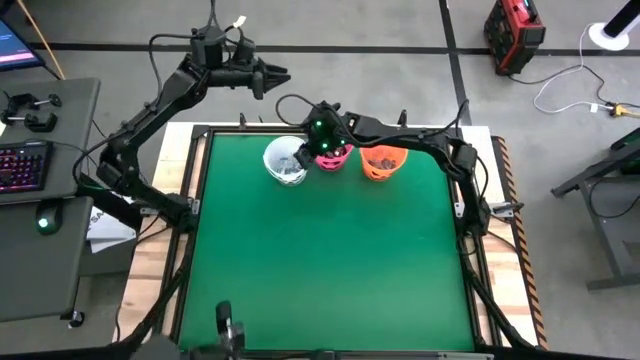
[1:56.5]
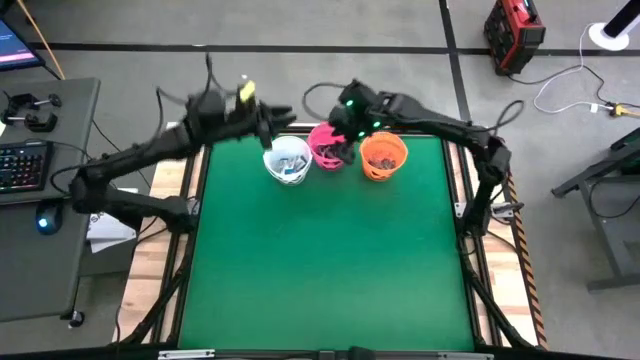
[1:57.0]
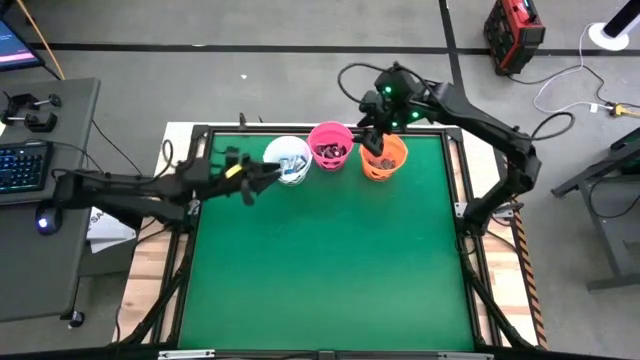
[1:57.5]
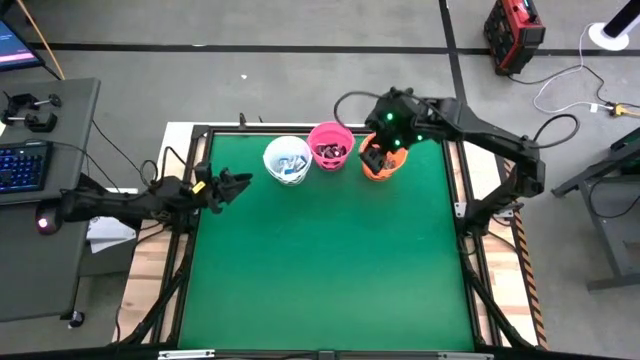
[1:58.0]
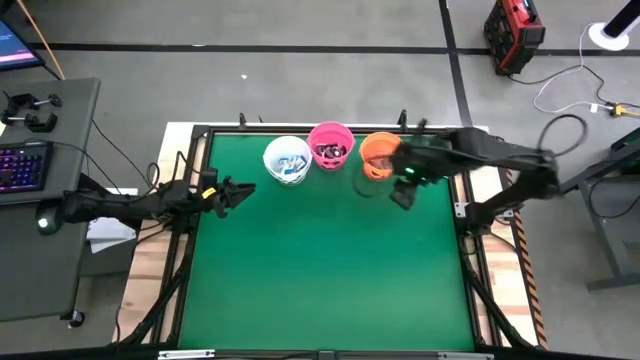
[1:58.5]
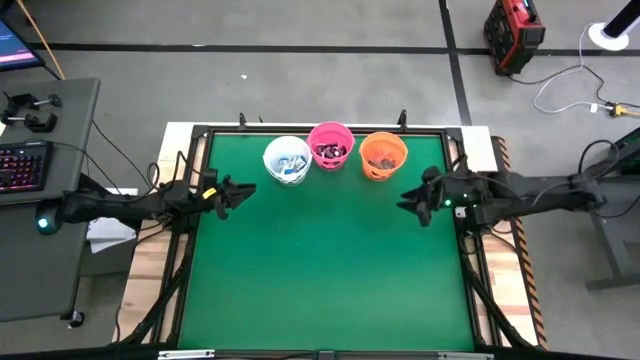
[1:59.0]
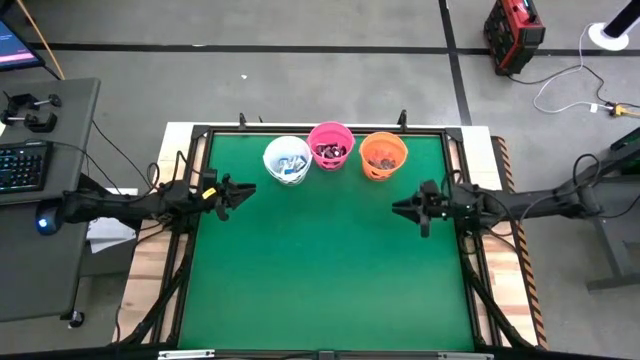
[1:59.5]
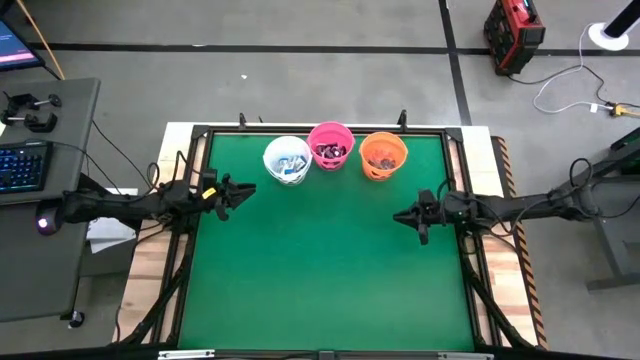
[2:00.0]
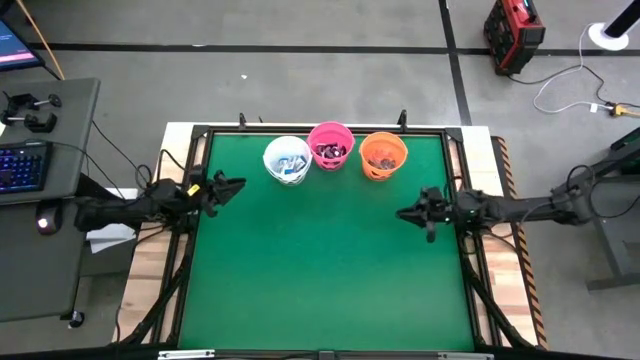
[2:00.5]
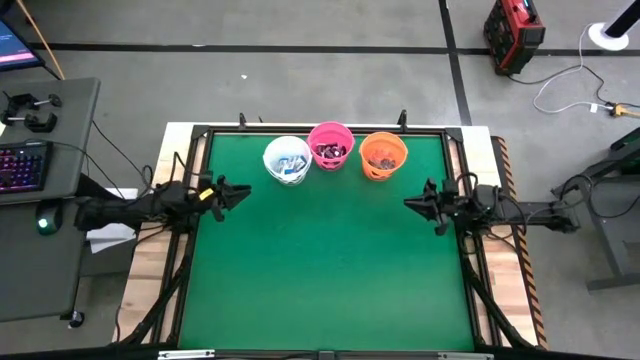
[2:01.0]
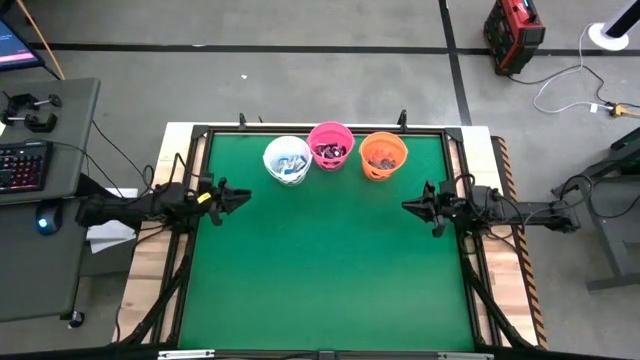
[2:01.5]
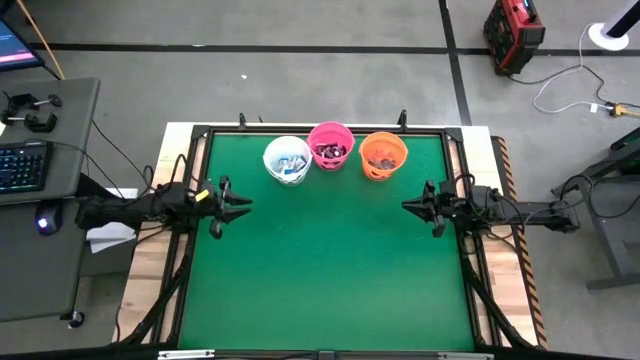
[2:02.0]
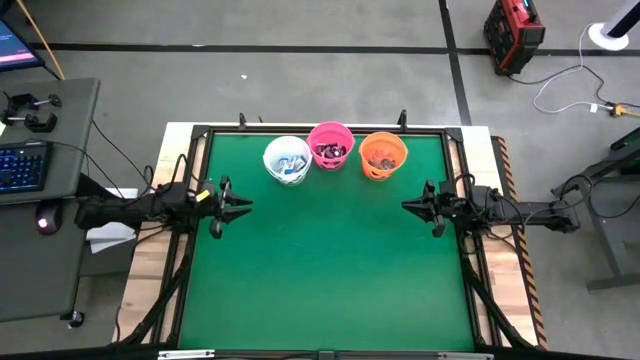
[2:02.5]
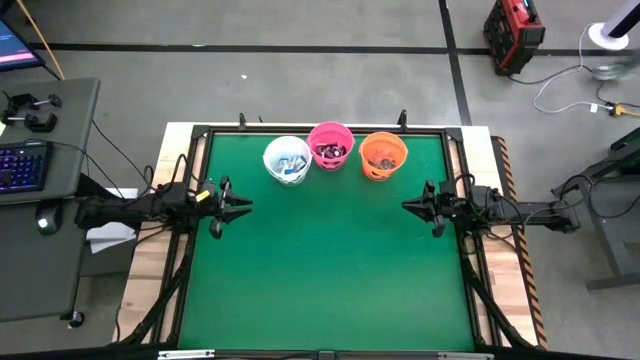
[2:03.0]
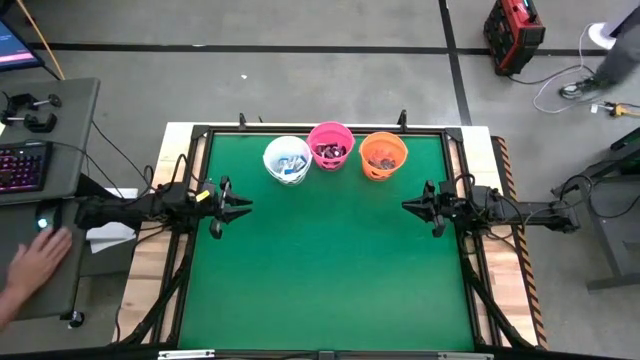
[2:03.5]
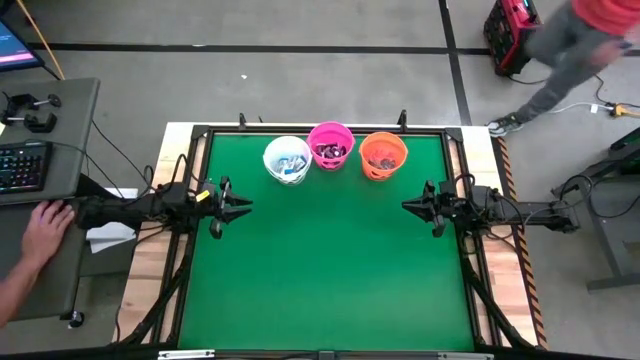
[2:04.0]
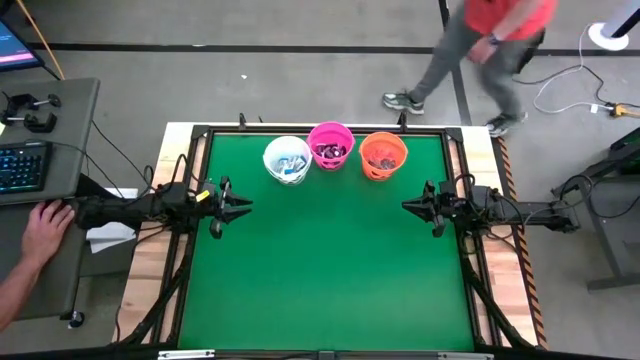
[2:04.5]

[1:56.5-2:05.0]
Task: Sort candy by brand, put in halloween buckets
Return to Home Position

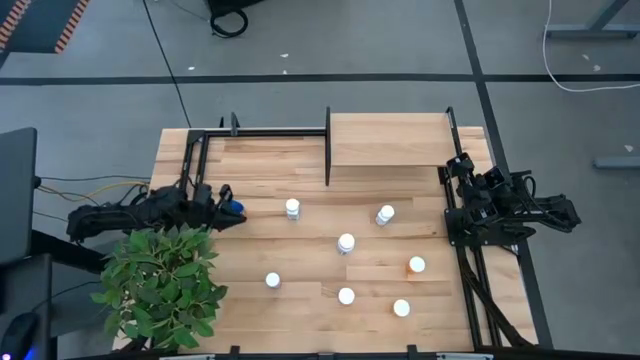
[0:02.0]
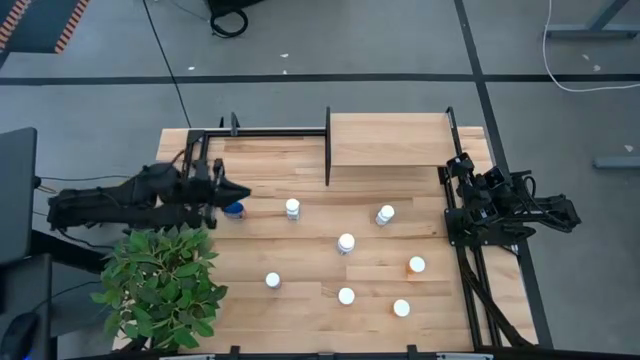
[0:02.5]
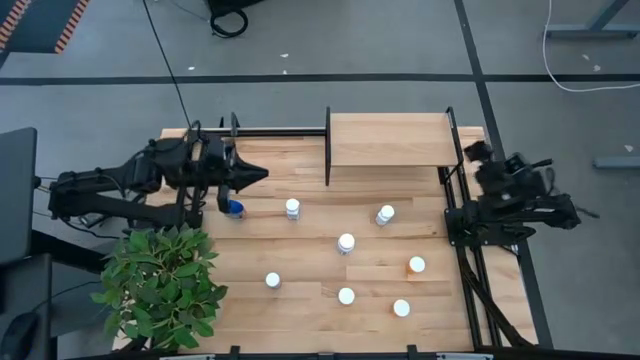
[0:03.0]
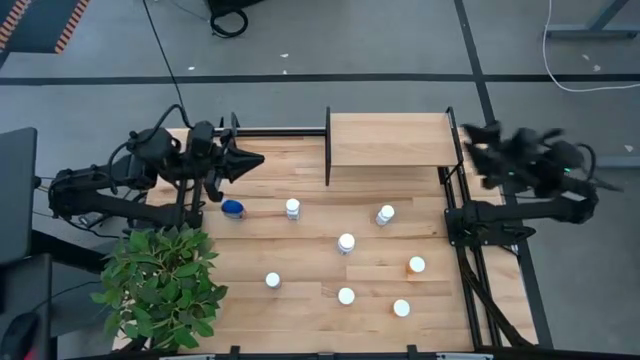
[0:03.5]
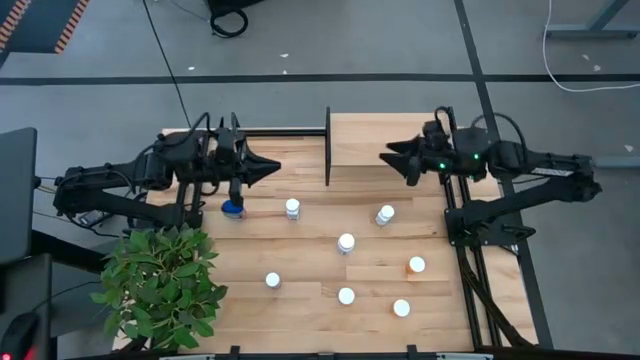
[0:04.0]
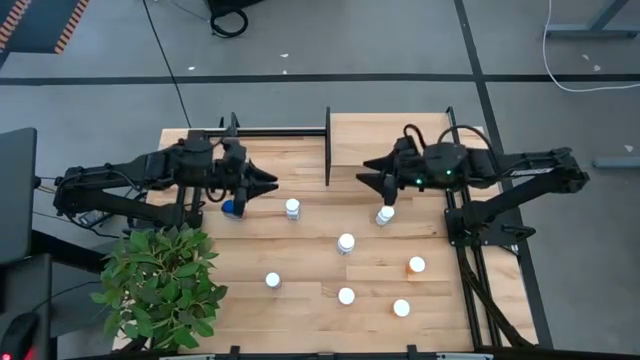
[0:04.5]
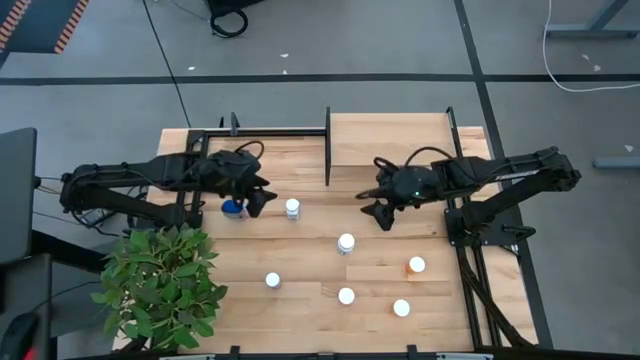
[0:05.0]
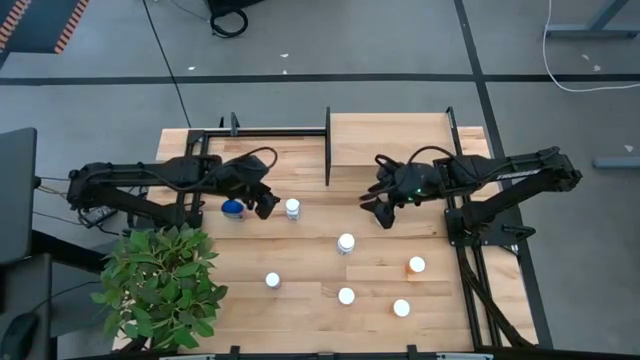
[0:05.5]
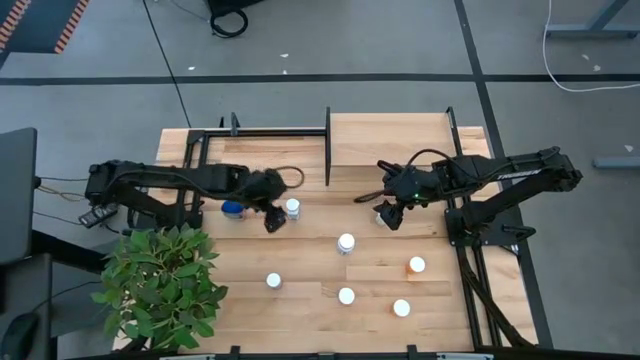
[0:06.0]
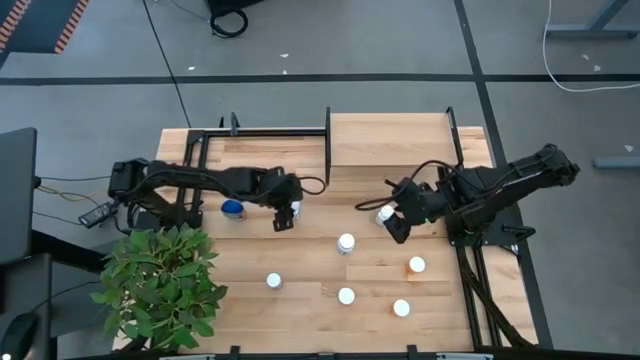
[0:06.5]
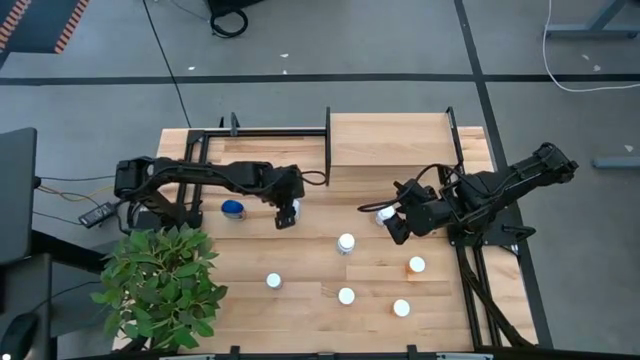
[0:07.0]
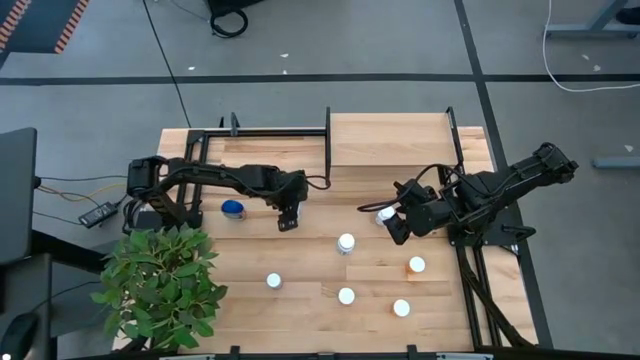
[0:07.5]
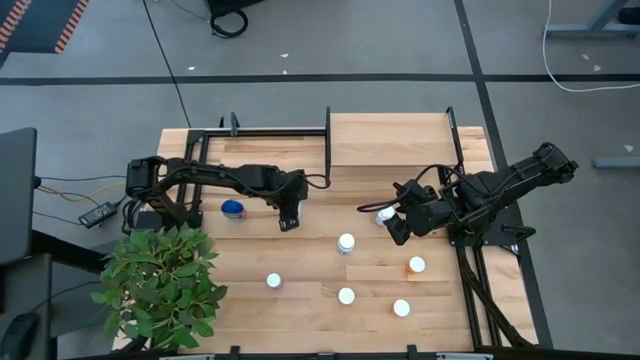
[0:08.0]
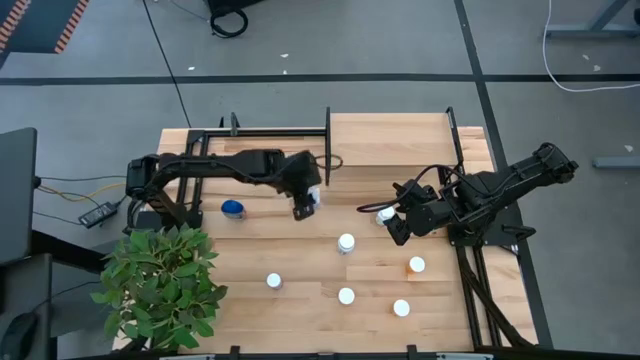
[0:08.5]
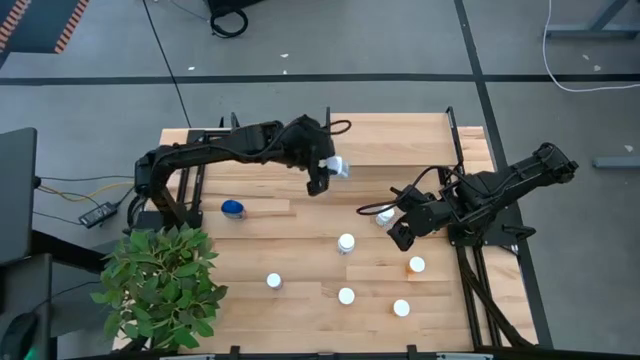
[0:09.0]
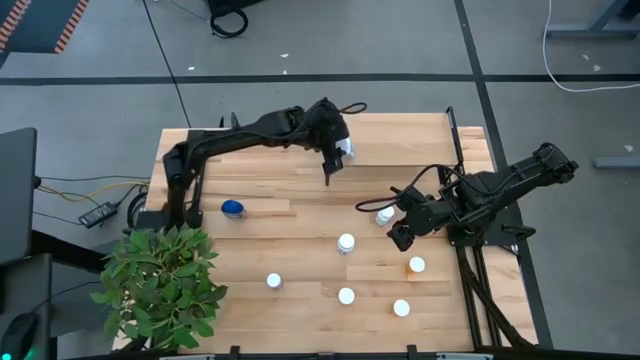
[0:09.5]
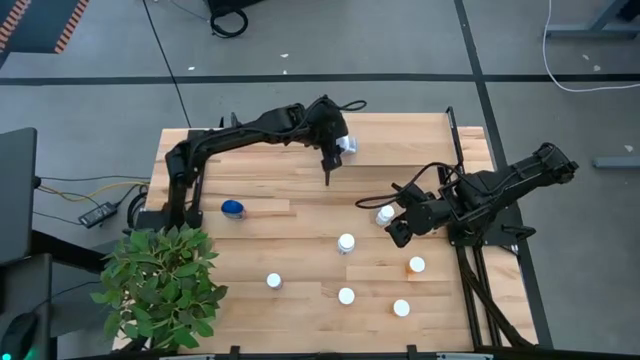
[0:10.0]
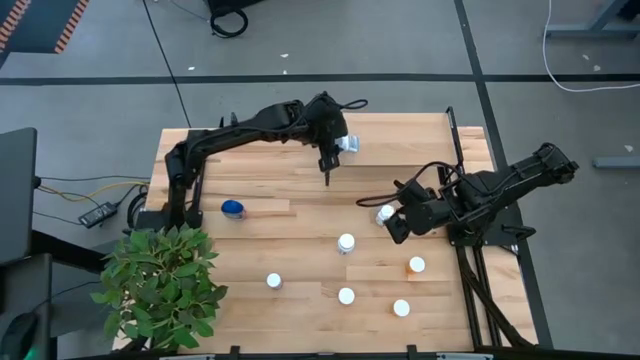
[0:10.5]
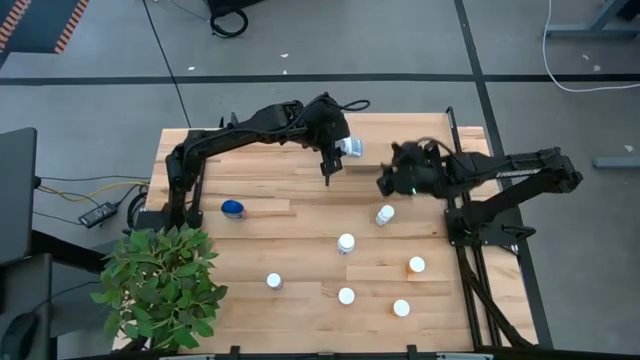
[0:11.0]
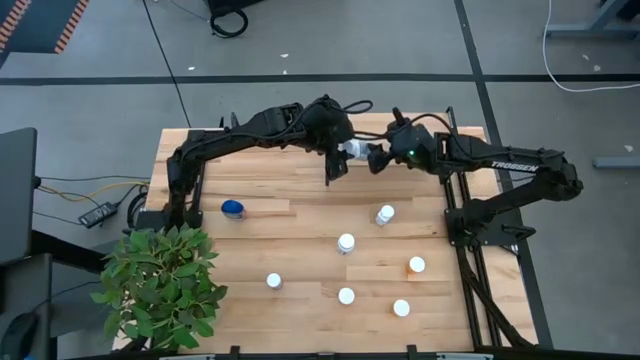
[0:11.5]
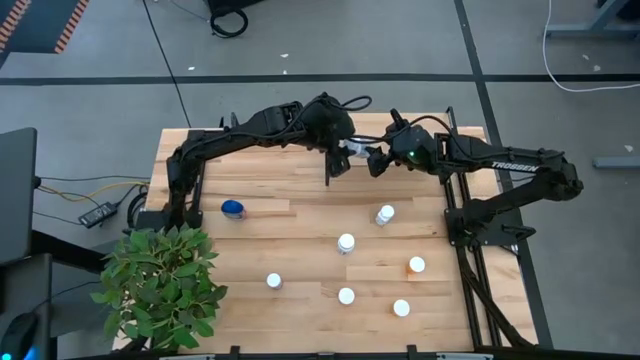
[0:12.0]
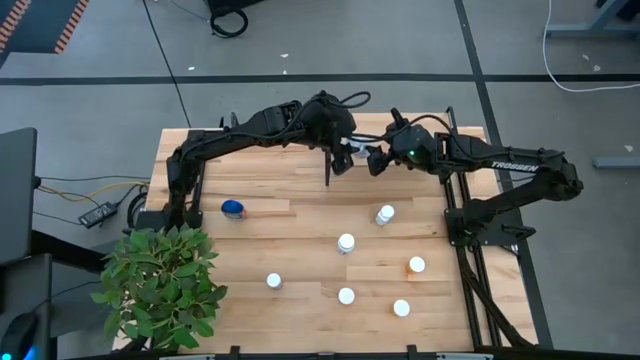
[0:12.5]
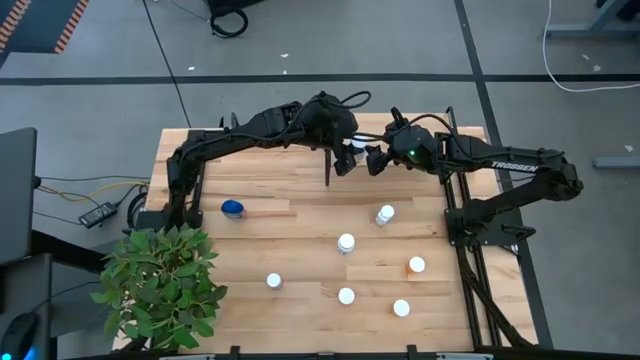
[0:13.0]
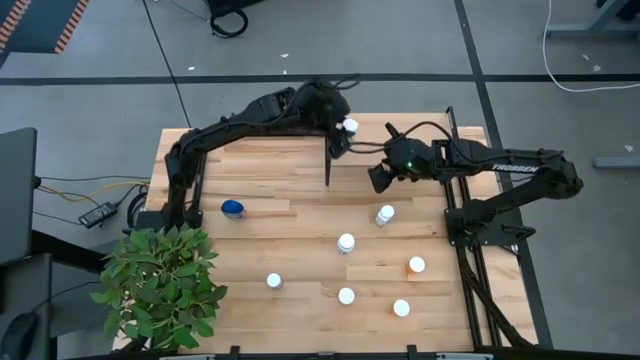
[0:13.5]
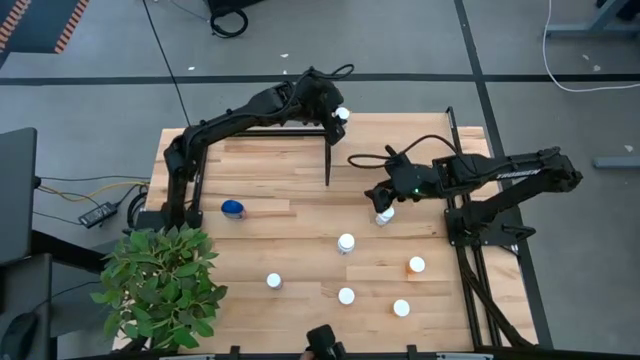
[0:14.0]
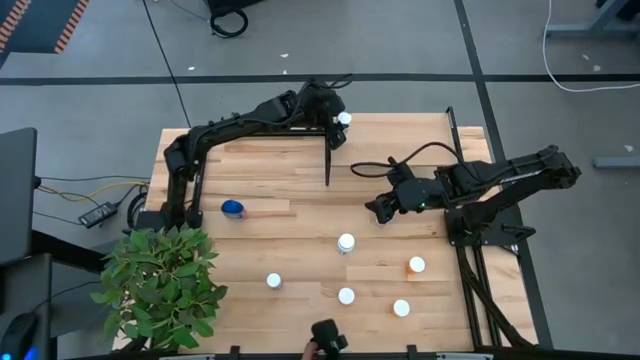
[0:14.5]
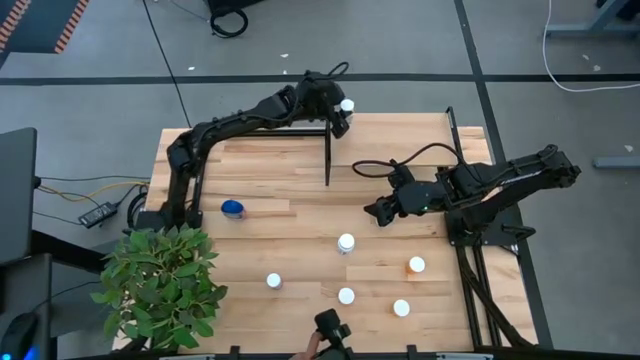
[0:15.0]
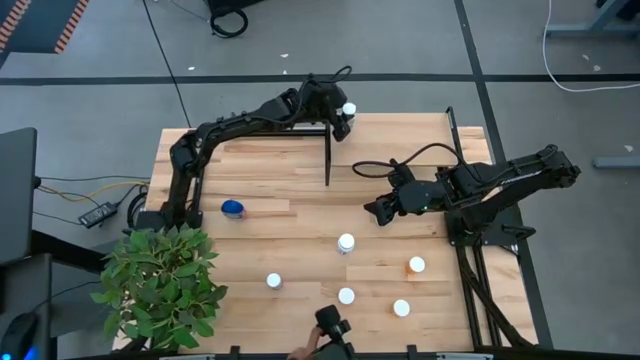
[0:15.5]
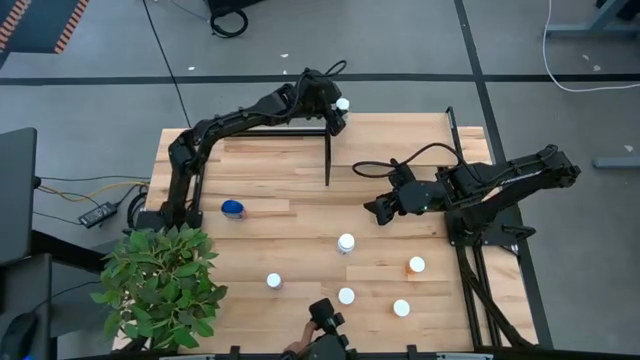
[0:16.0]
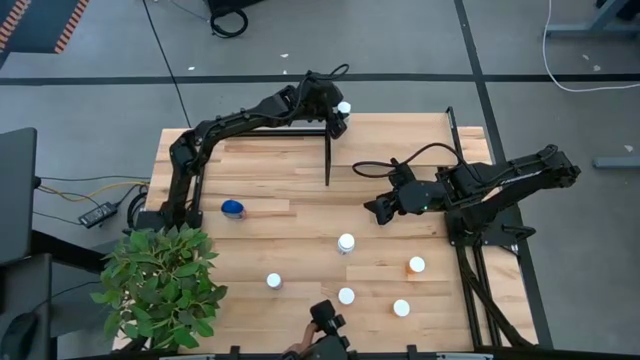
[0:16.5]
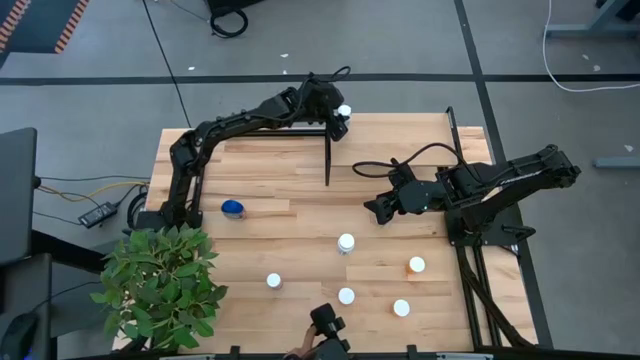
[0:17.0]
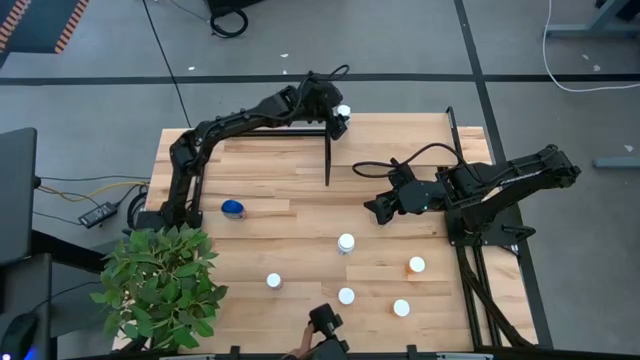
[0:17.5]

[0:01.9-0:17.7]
Task: Pick and place medicine bottles onto shelf by color
Put the left white and blue medicine bottle on the shelf
